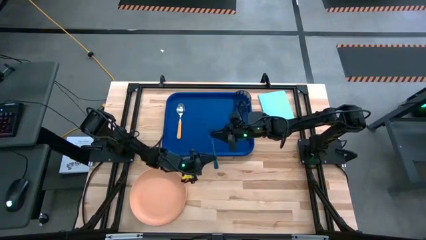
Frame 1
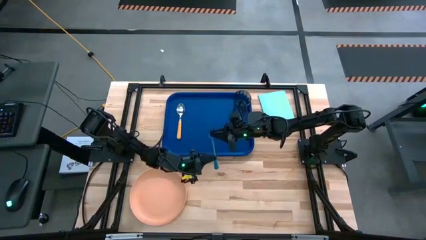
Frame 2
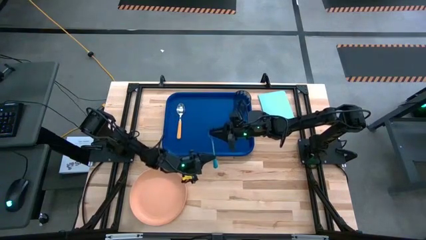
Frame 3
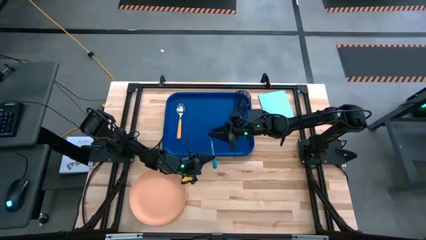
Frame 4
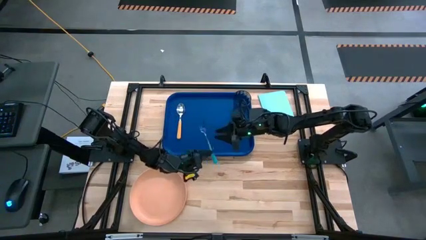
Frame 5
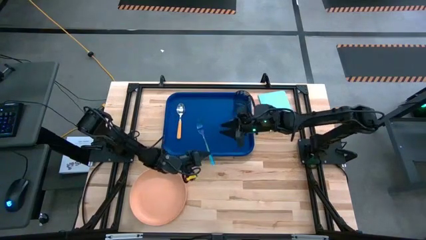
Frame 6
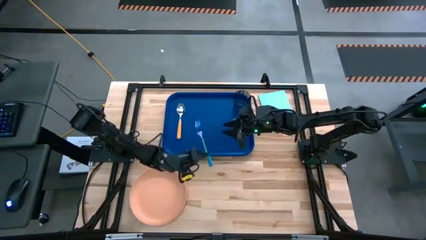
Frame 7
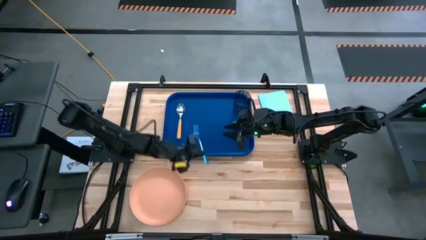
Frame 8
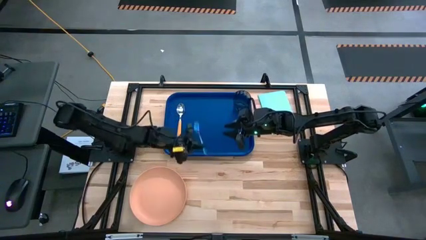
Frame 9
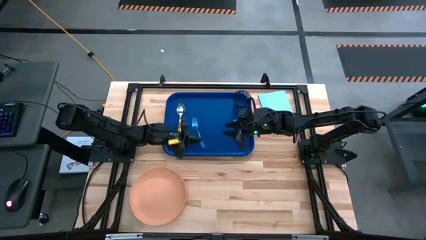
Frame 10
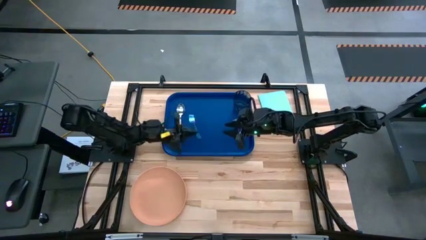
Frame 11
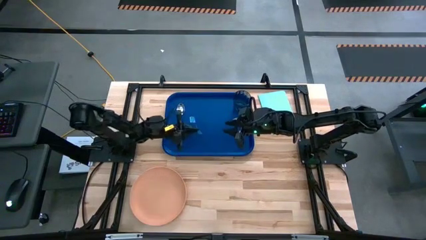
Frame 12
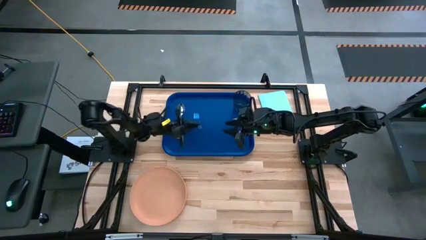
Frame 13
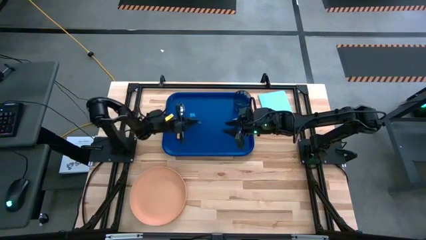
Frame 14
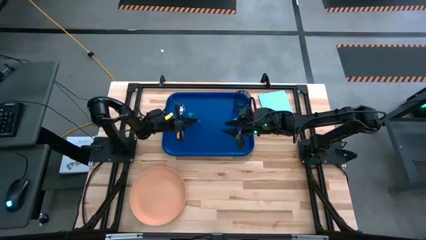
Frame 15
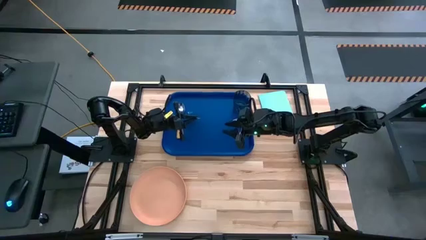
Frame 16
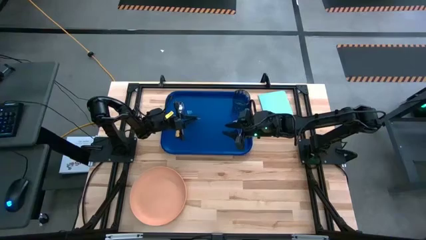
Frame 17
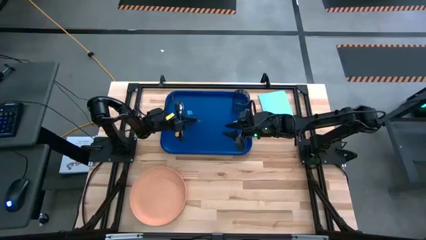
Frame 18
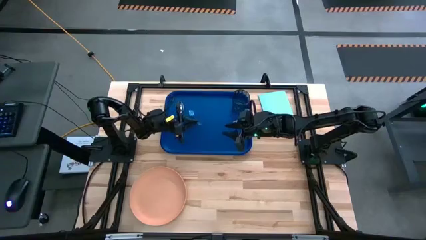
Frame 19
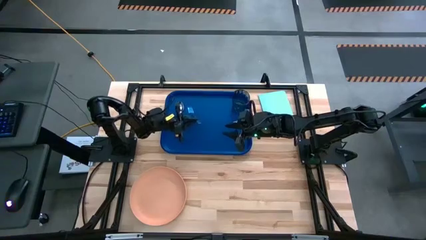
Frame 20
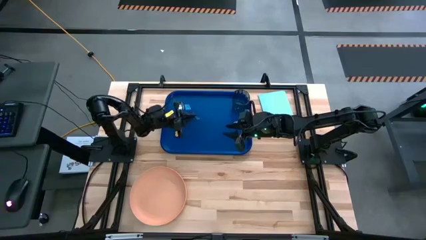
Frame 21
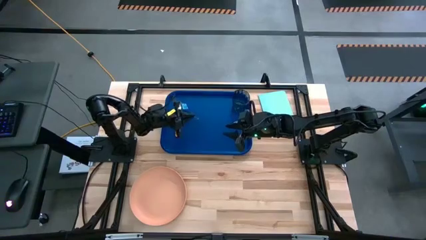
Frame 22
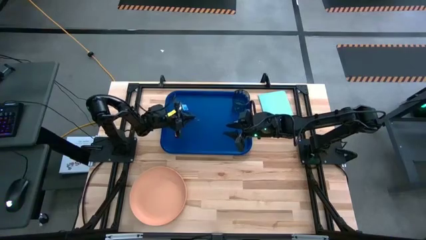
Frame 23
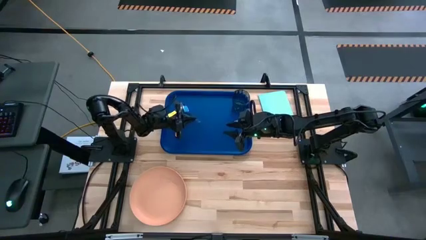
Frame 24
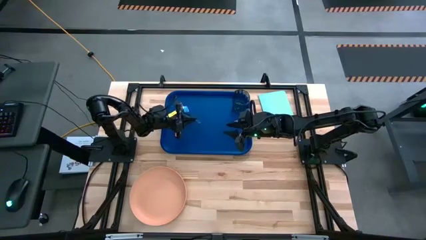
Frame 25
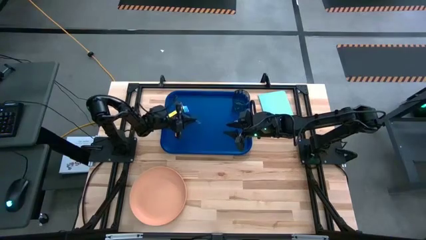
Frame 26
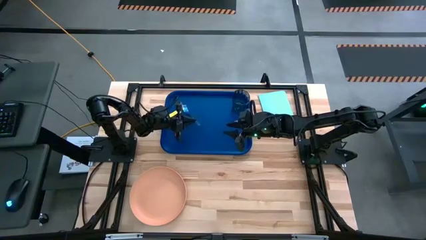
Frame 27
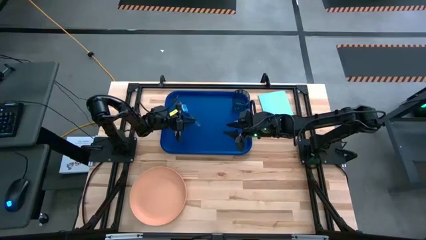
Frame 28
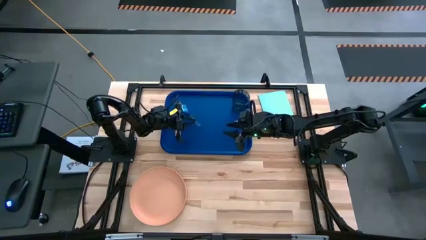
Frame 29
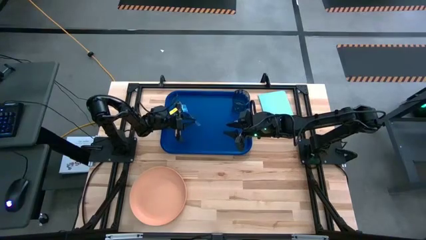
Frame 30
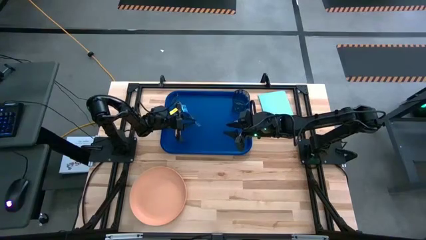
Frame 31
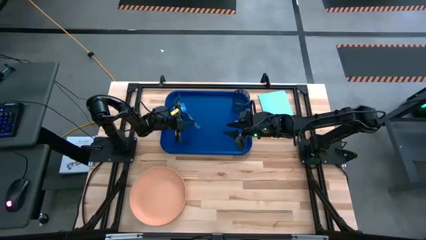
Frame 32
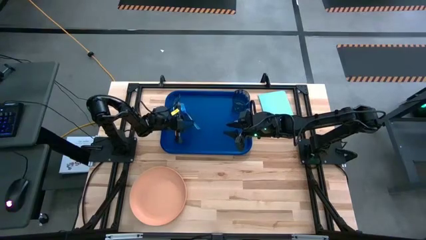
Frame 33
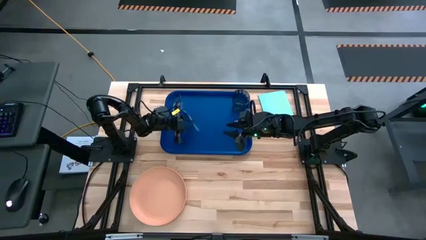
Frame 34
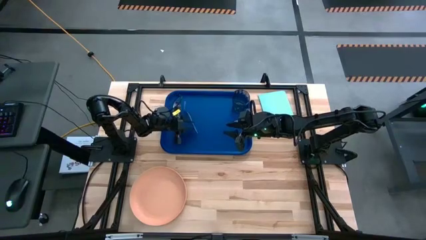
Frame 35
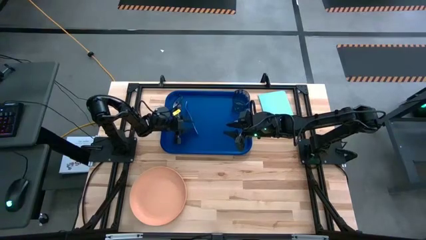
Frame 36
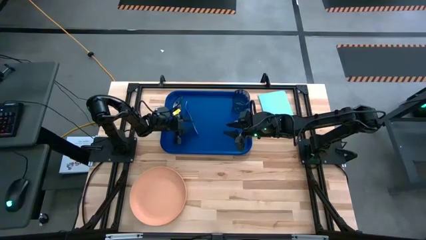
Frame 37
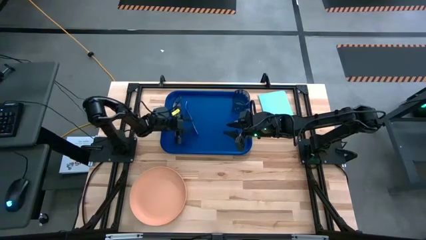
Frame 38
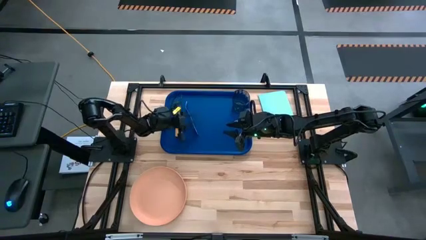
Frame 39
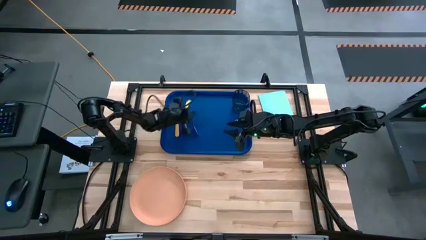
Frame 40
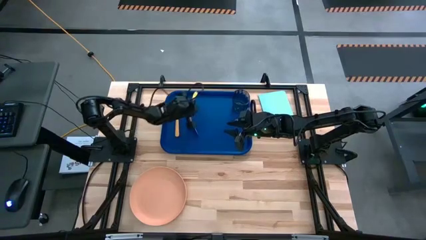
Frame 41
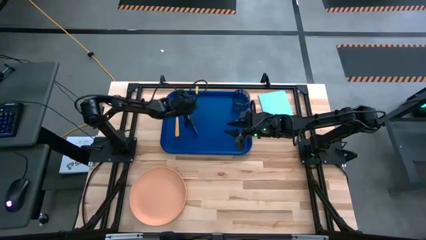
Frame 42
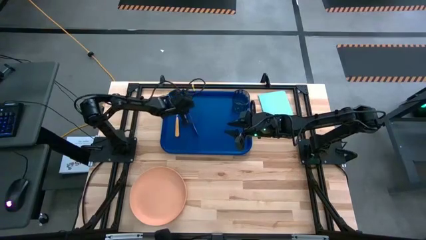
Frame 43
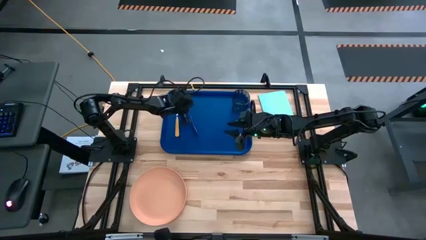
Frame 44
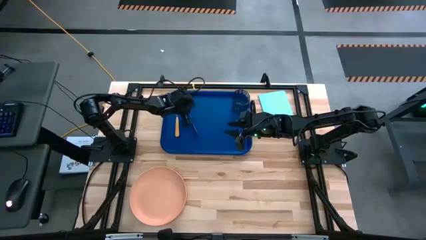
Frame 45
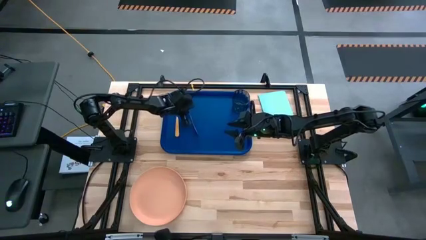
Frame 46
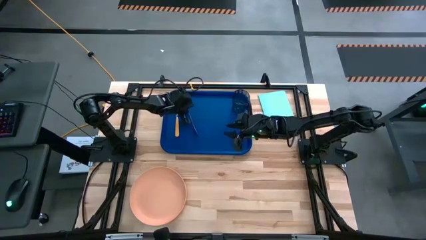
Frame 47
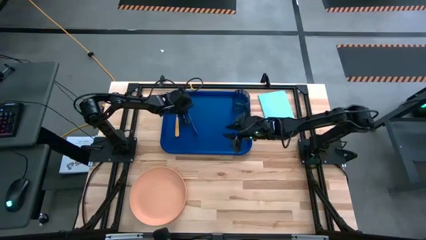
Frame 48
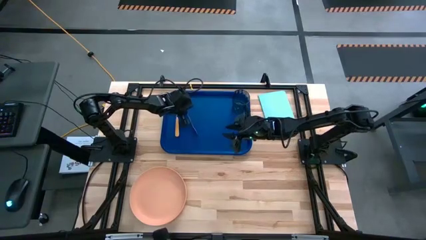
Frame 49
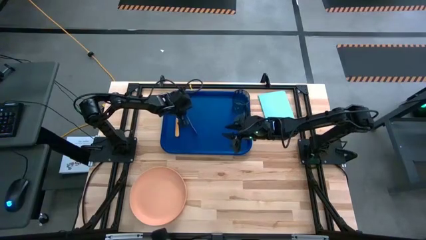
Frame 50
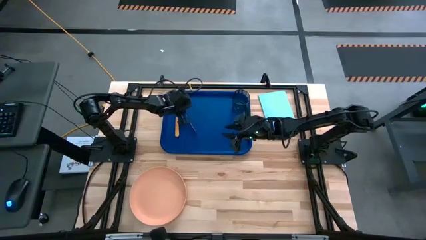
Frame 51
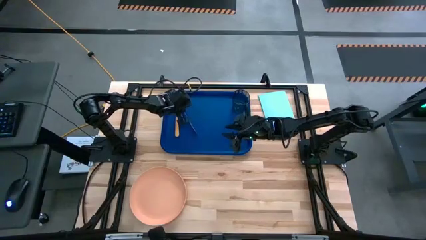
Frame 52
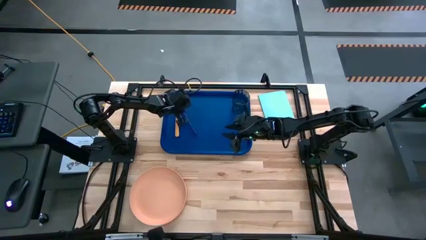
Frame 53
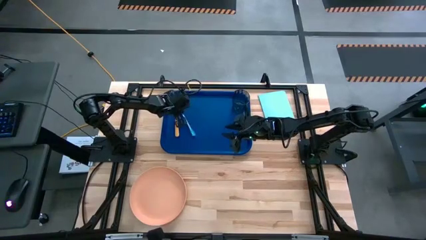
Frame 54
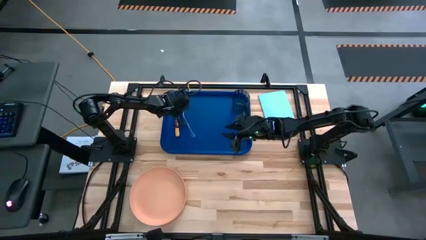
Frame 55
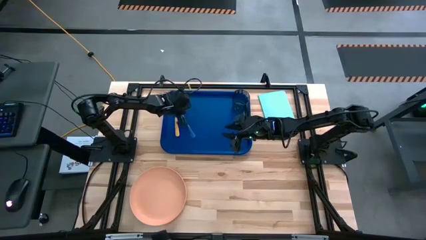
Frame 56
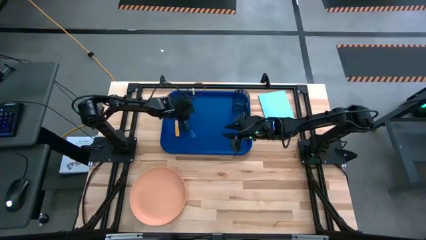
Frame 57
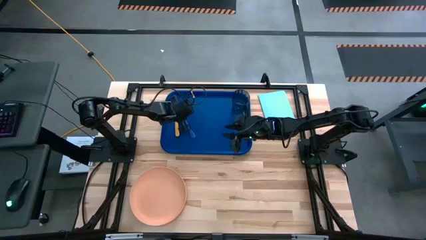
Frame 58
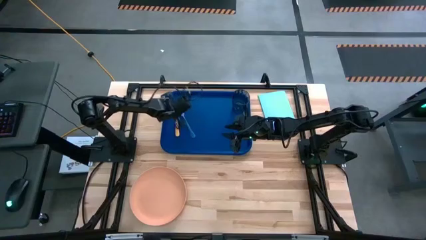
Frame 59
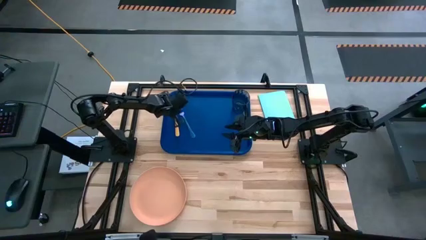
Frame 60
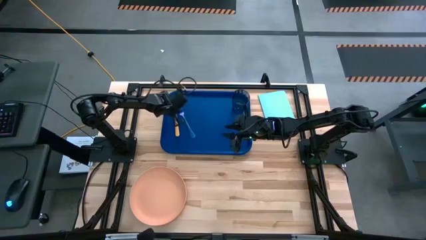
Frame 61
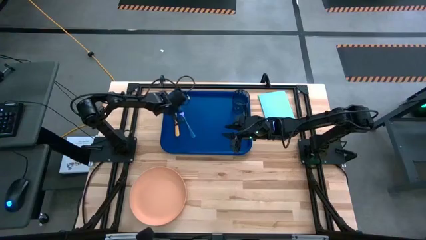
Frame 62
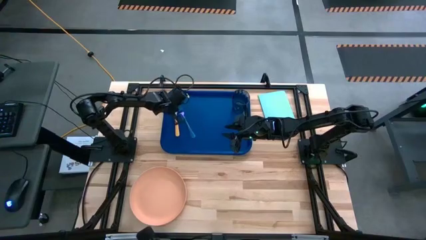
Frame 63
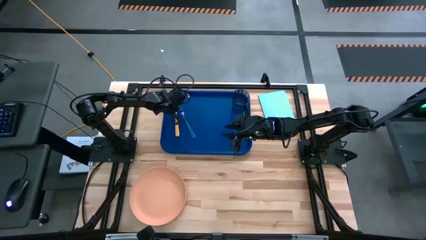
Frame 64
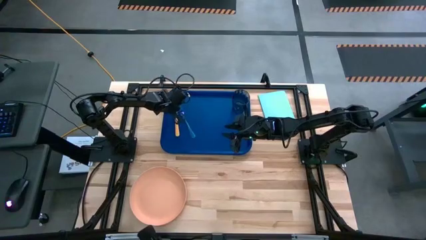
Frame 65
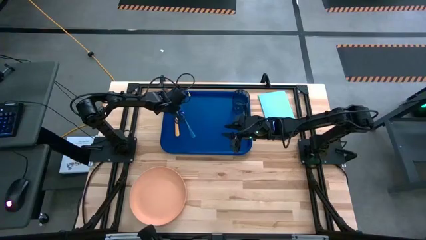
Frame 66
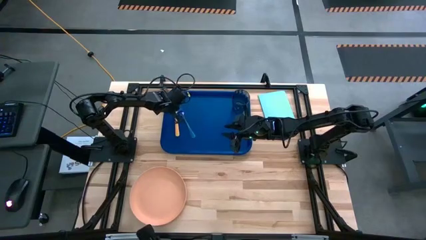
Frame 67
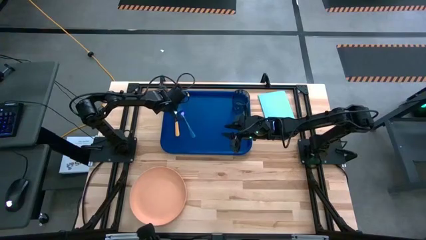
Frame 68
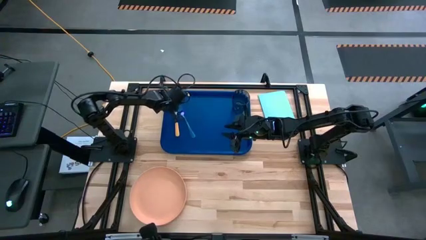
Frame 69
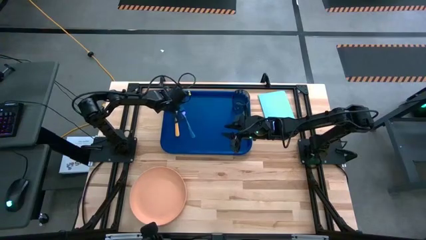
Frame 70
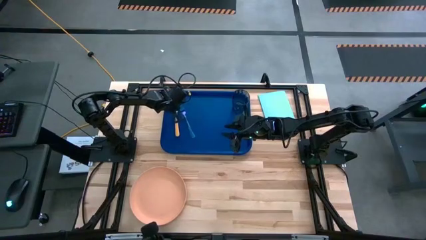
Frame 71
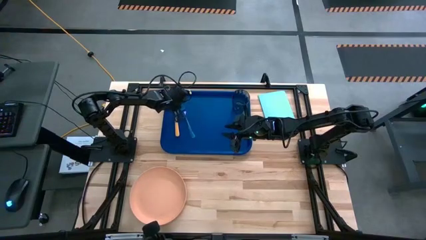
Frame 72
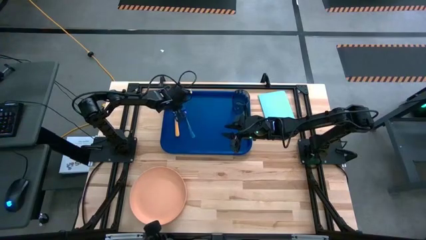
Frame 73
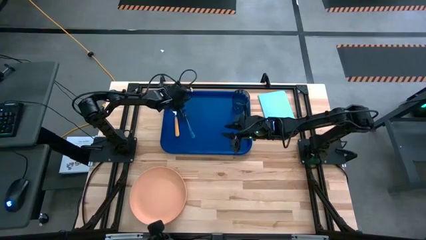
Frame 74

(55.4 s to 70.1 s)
Task: Pick and place plate/cup/fork/spoon on tray
Put the blue fork to the right of the orange spoon on the blue serving tray
